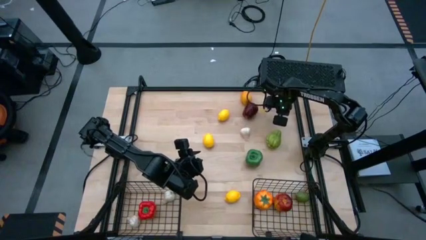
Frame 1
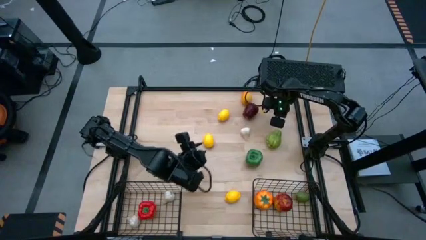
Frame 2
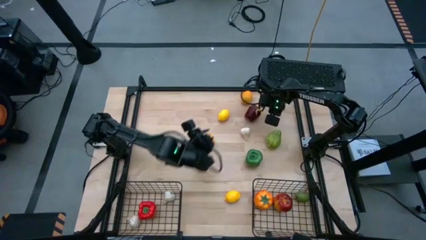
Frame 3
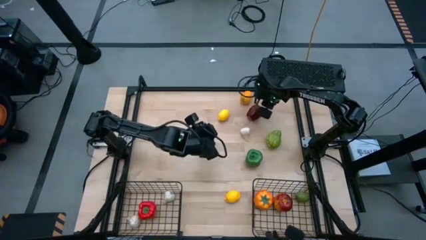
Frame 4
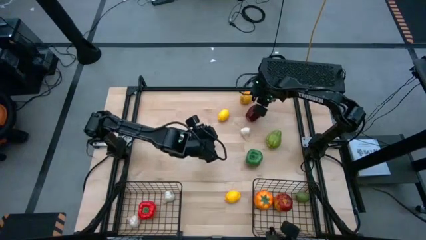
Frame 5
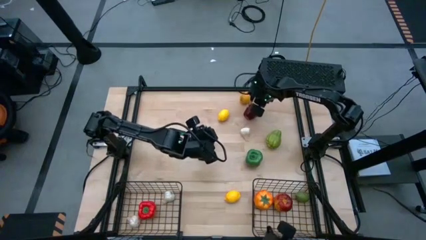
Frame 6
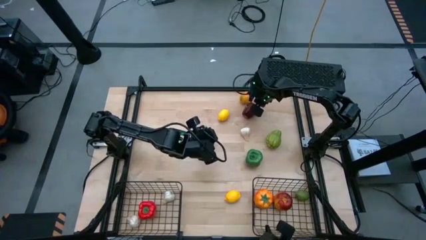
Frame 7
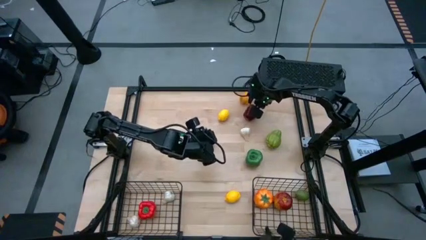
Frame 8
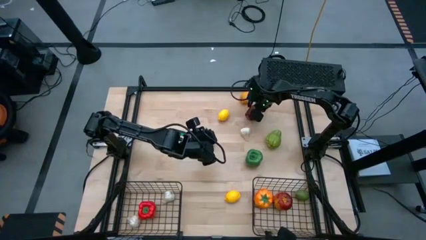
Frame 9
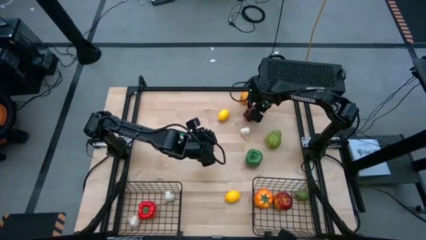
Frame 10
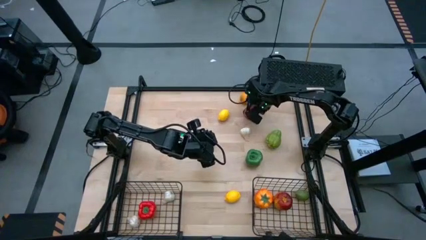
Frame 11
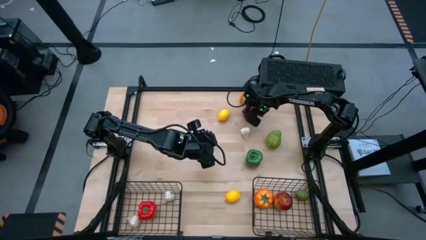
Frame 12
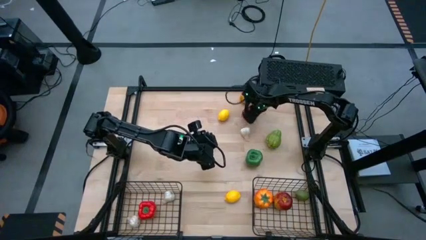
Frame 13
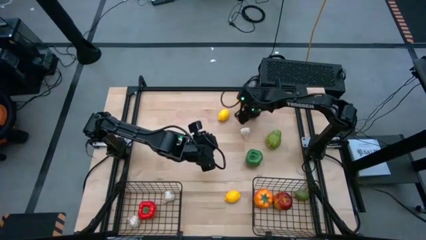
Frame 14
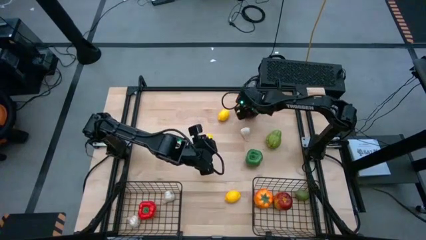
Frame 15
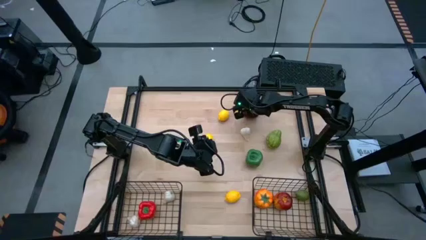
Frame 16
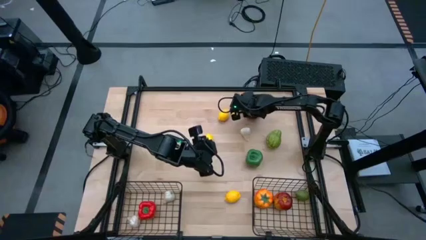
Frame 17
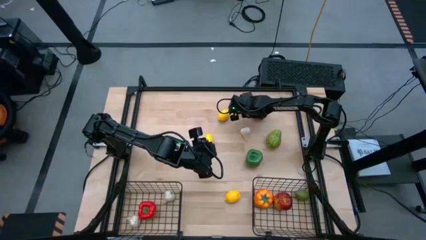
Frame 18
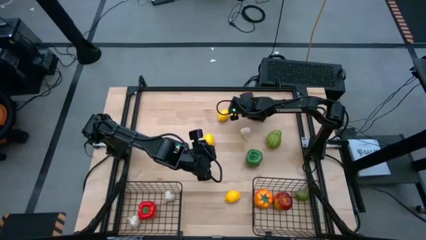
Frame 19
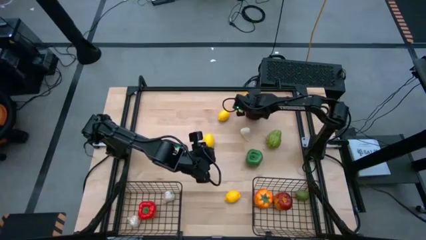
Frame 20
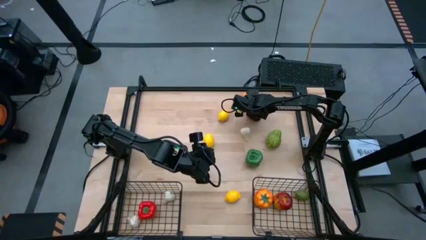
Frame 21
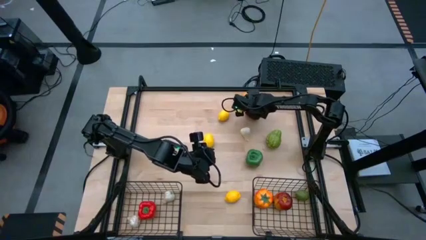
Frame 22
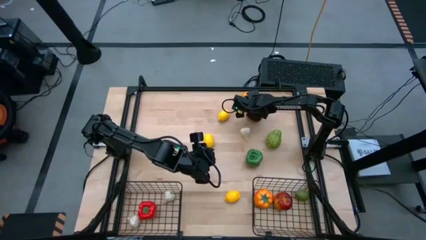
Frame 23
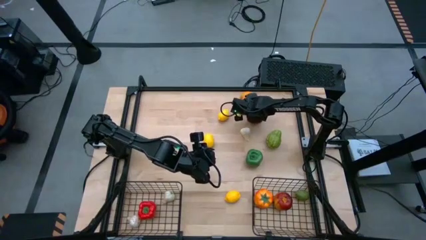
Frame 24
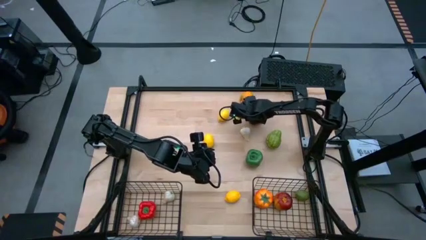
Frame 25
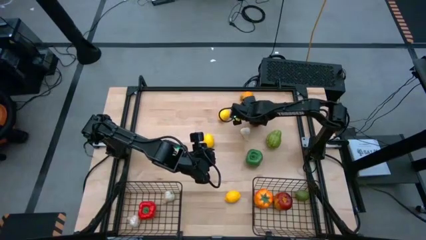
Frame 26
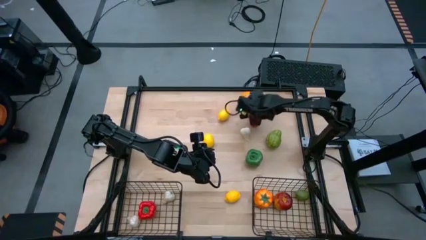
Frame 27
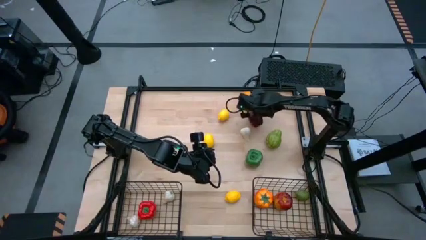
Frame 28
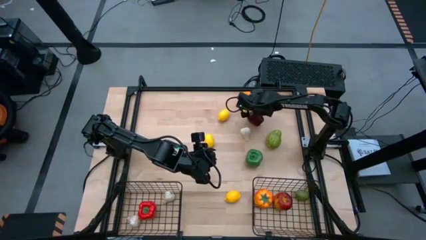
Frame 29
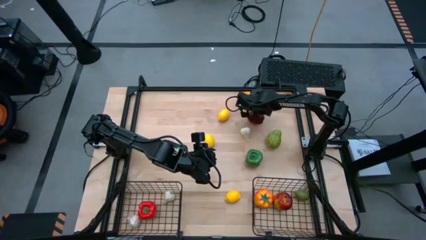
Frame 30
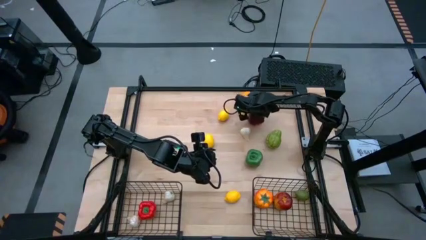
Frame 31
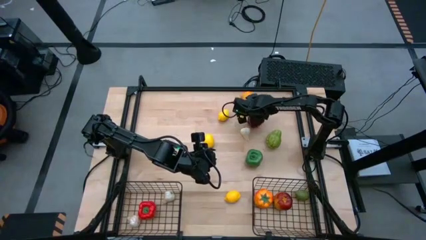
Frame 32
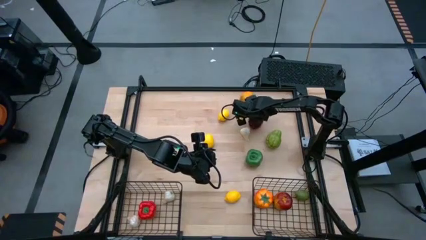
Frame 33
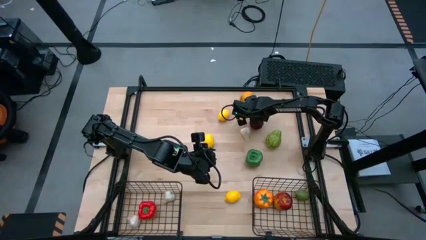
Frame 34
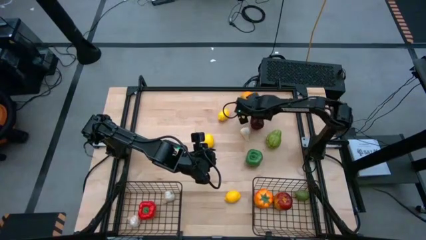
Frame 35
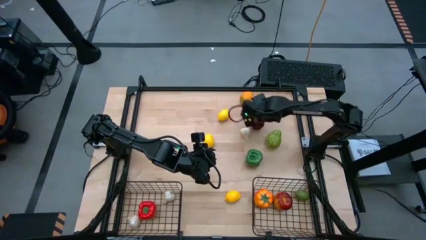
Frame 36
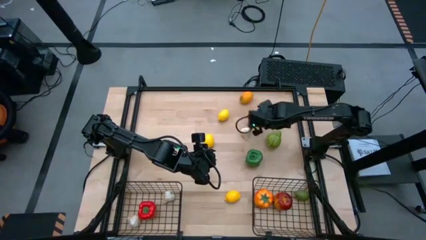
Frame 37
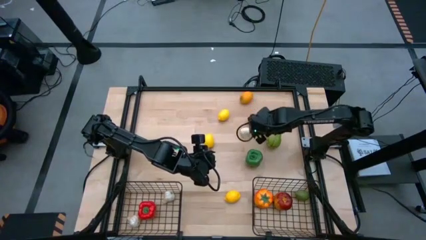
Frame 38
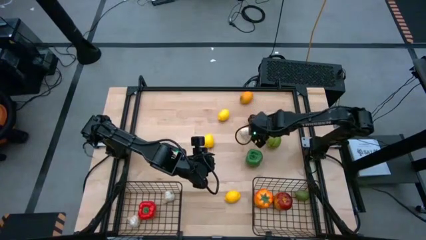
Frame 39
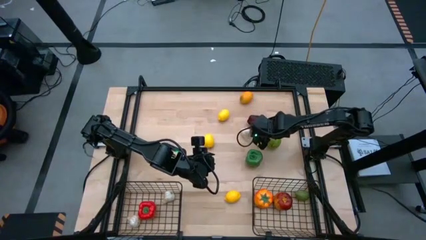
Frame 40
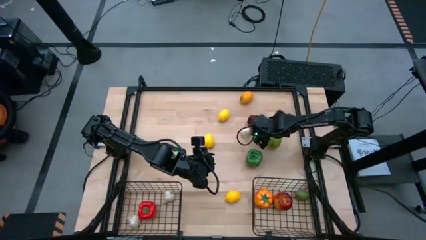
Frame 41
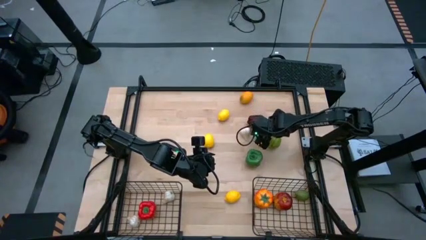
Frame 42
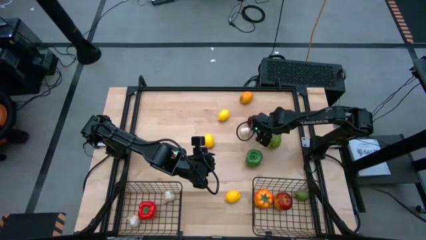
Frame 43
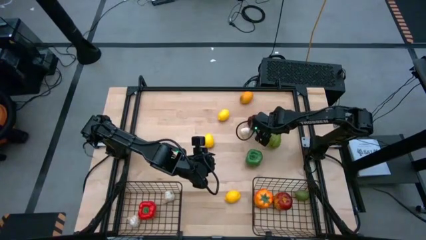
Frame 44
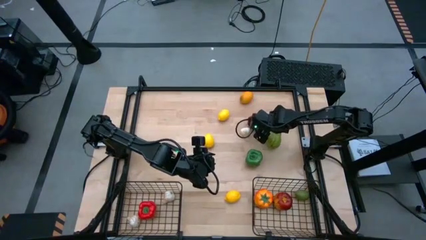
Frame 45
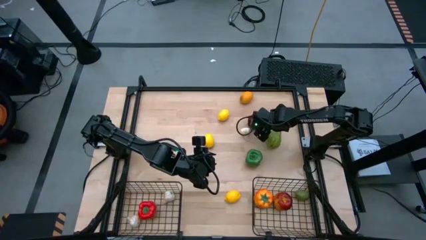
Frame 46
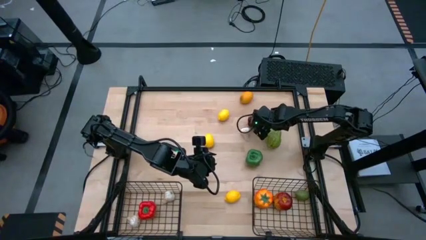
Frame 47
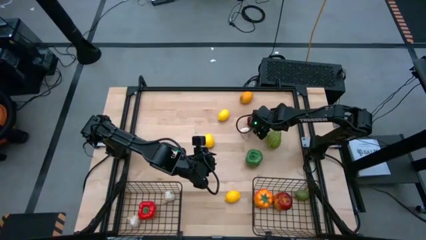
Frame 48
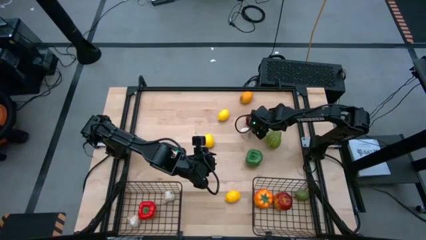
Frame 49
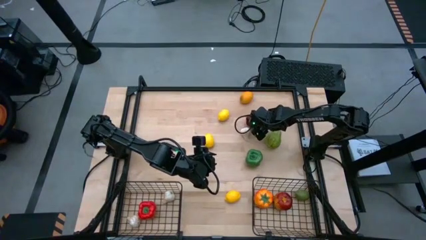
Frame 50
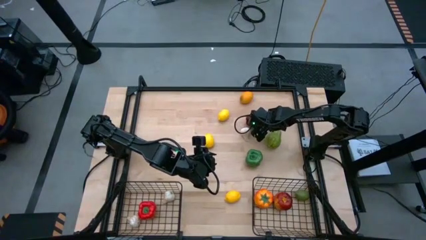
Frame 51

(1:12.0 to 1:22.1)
Task: Sort produce into baskets
Put the red apple into the right black wire basket
